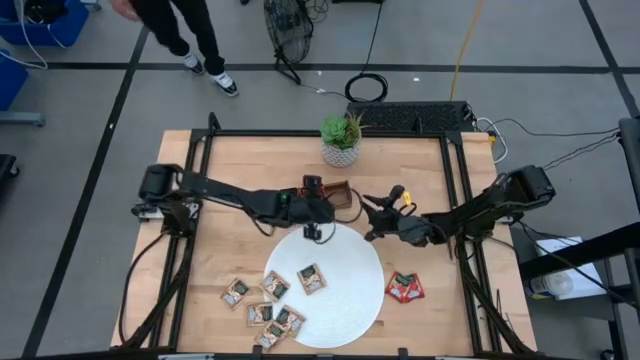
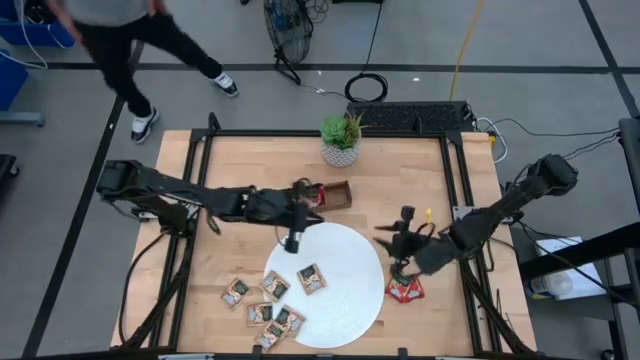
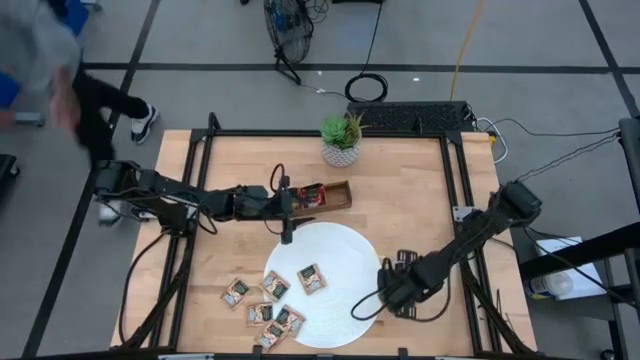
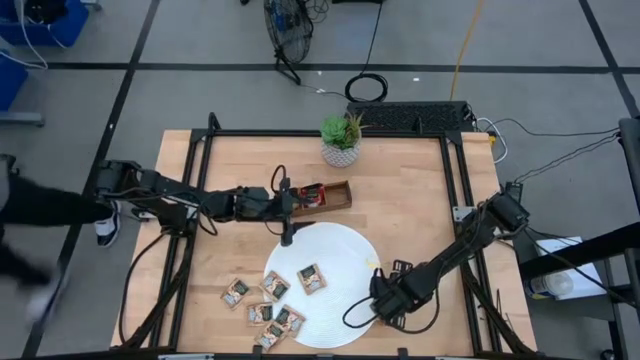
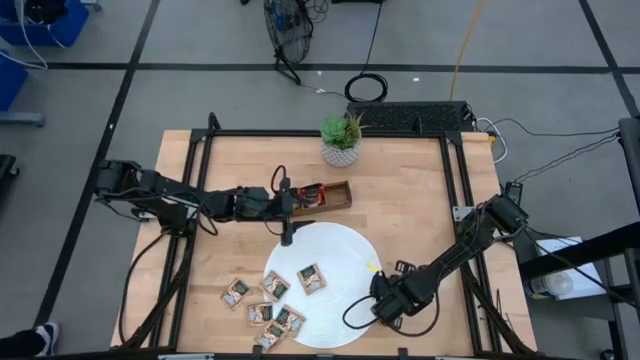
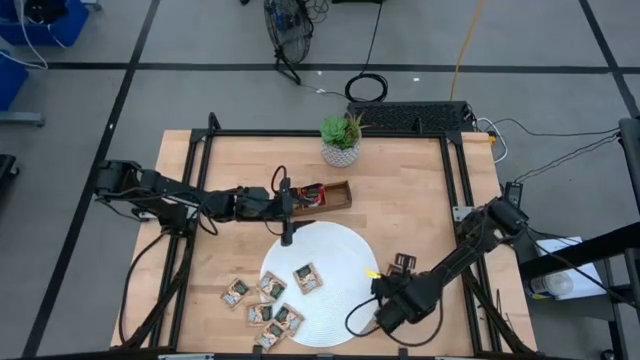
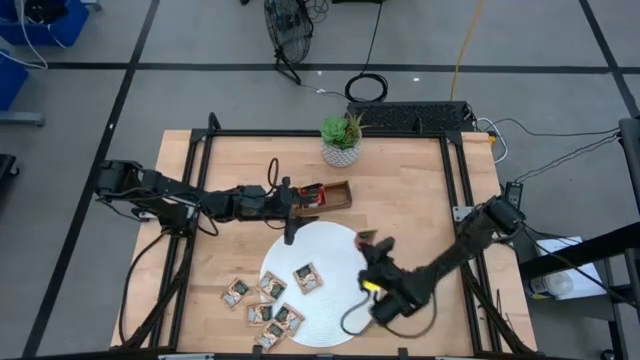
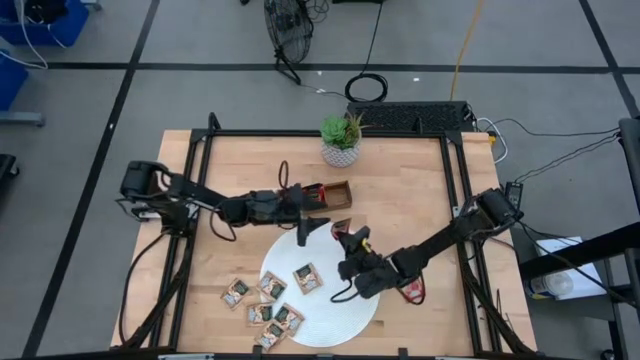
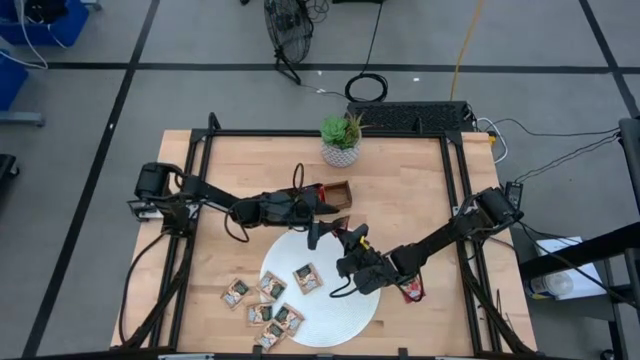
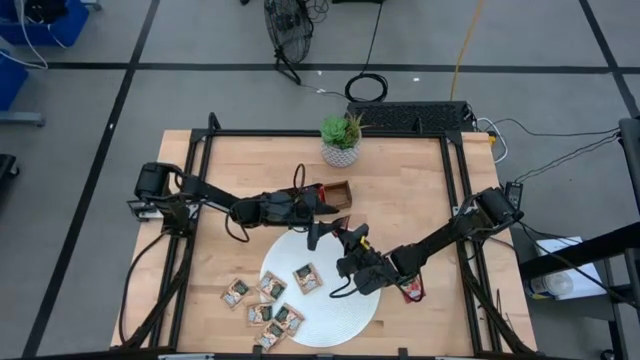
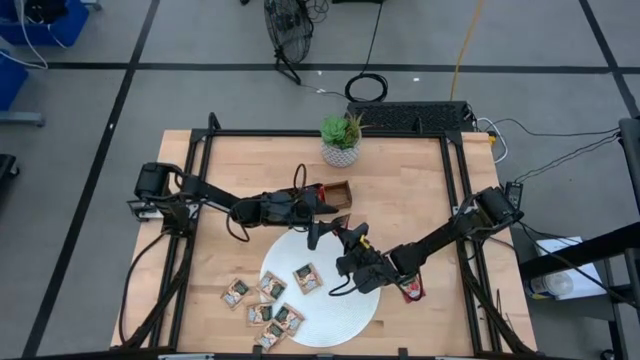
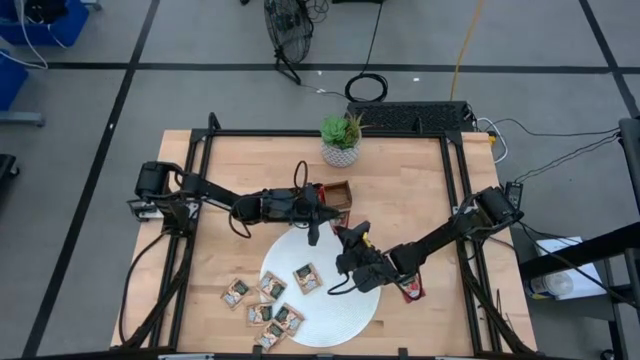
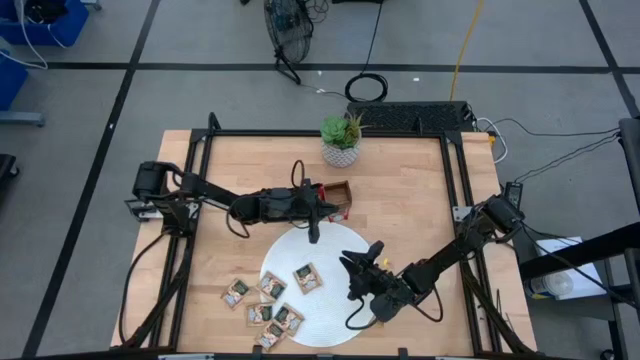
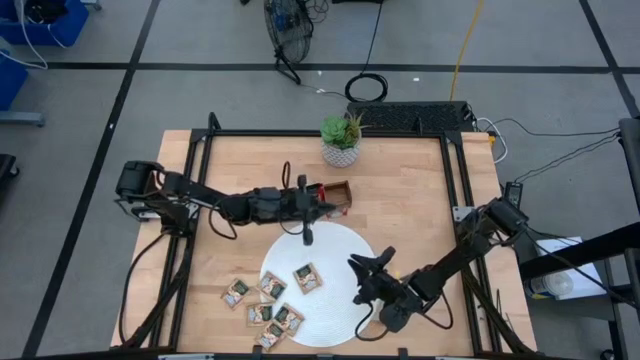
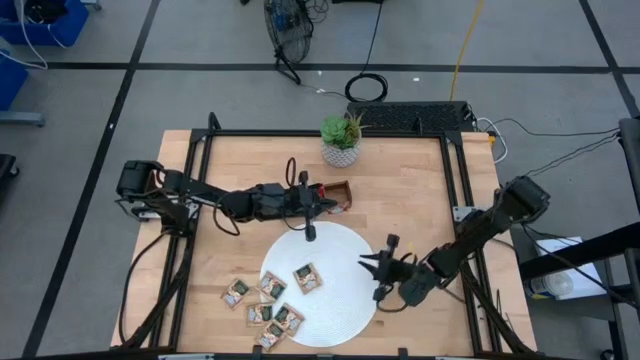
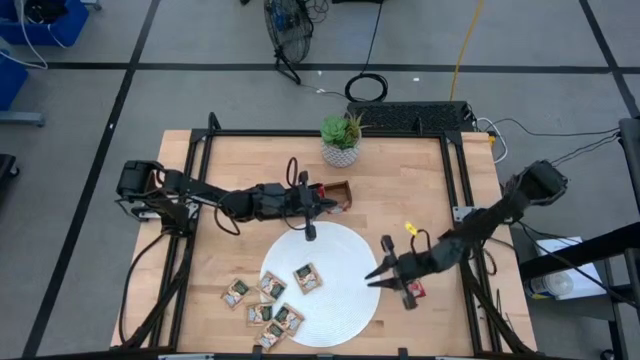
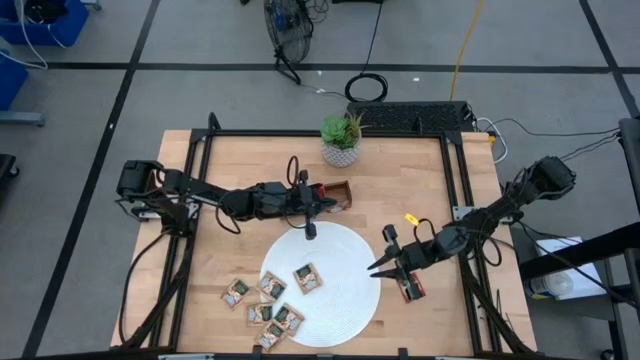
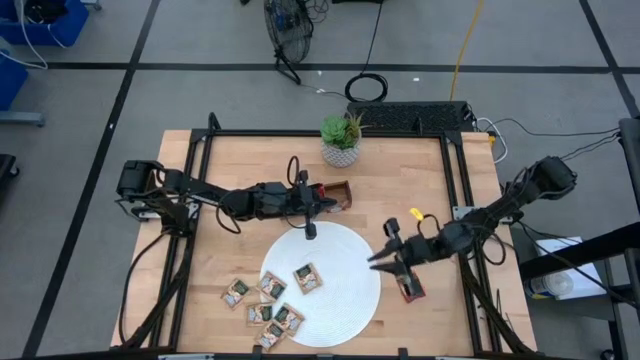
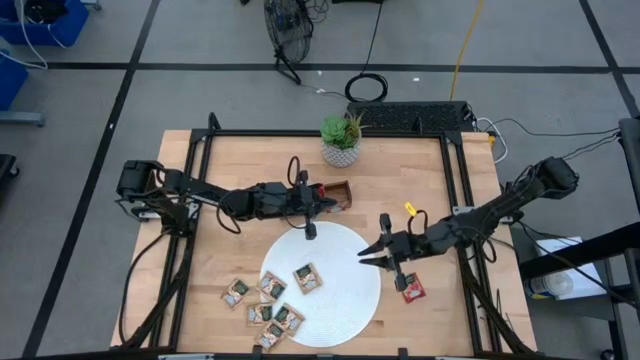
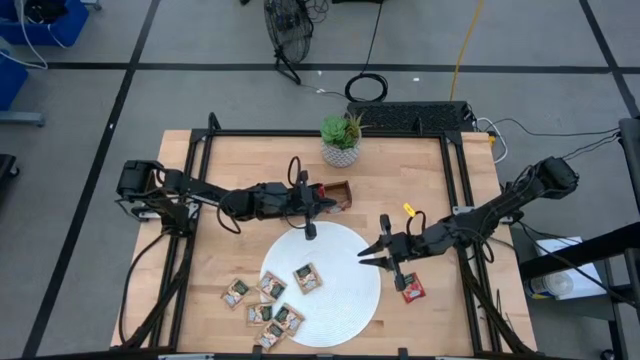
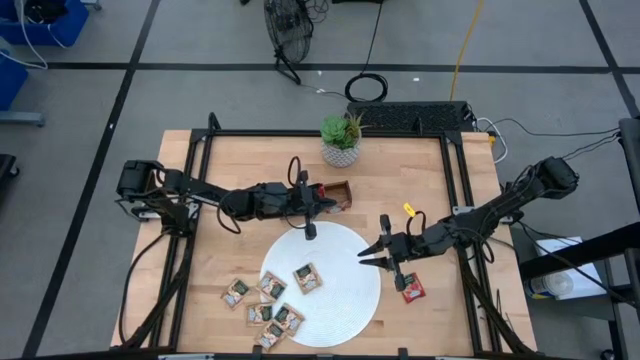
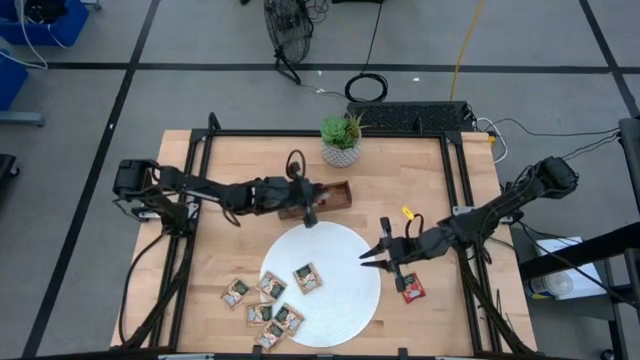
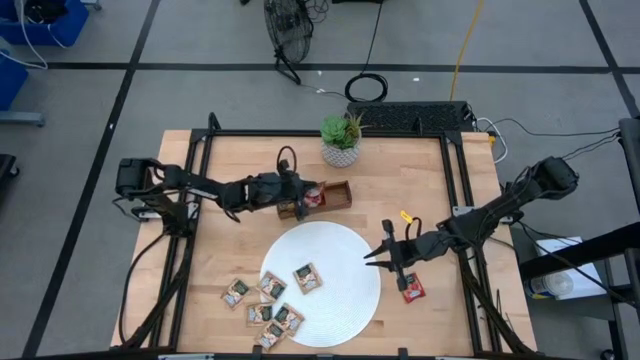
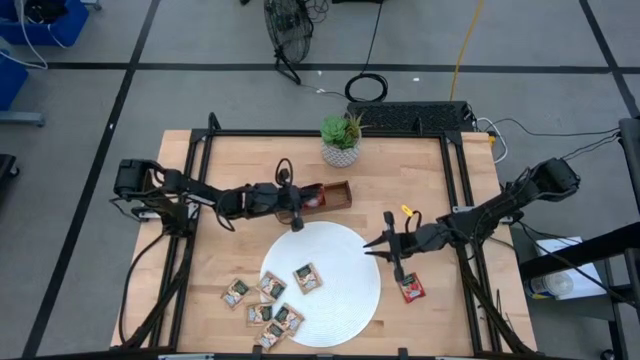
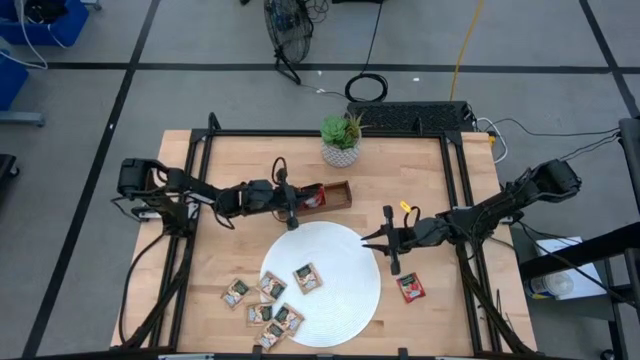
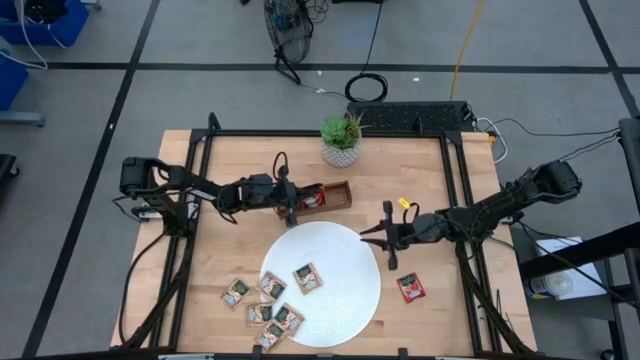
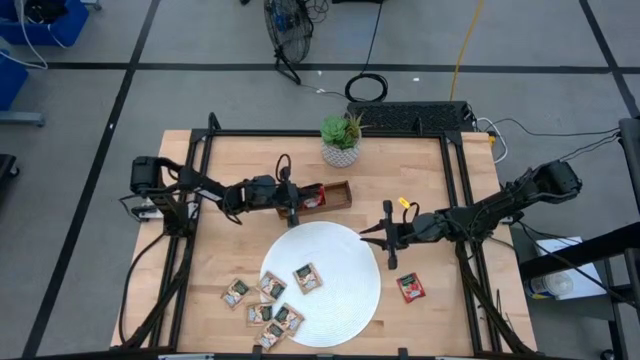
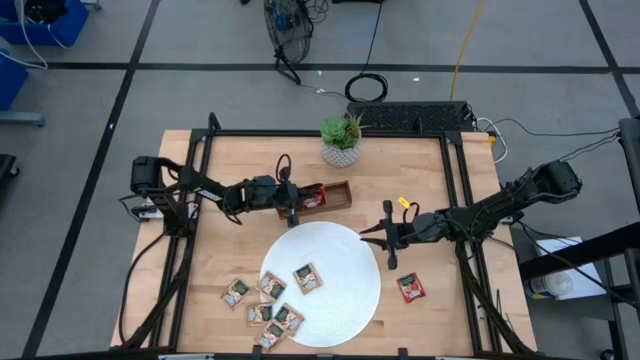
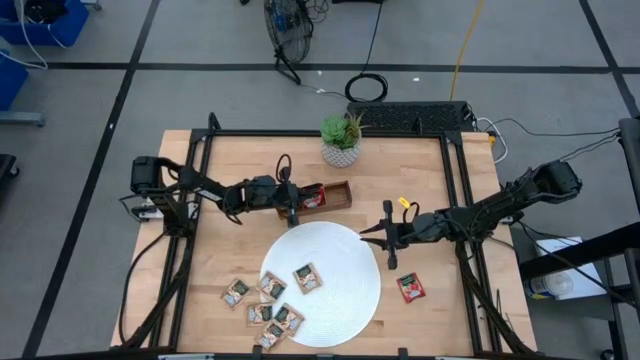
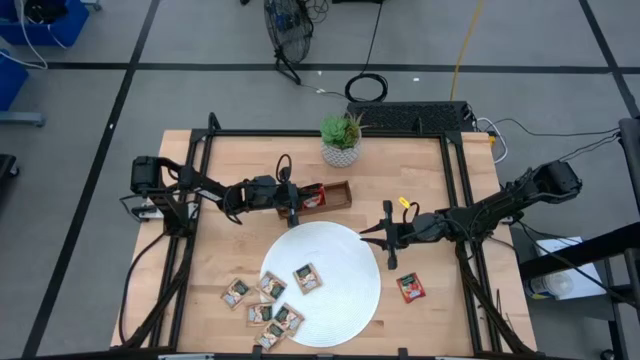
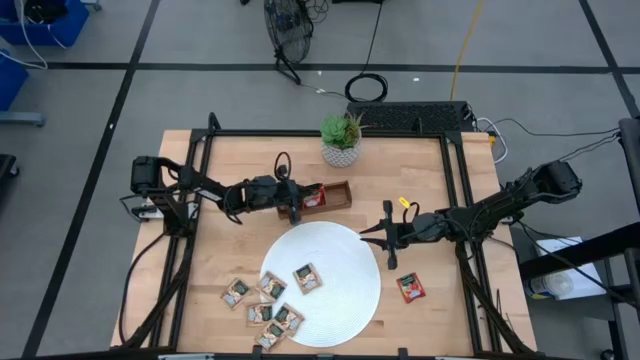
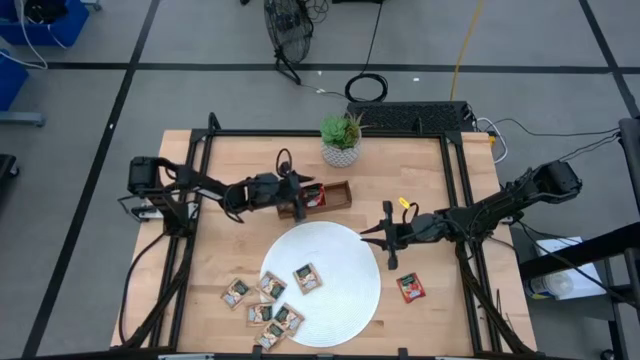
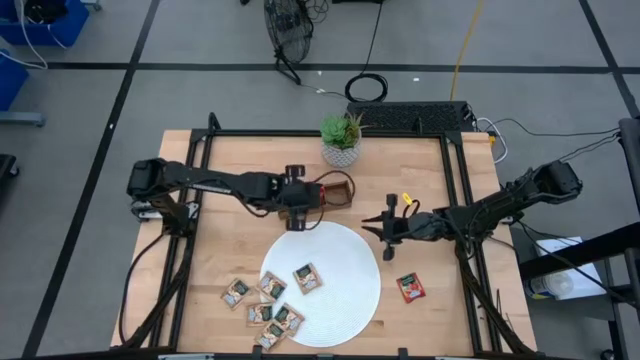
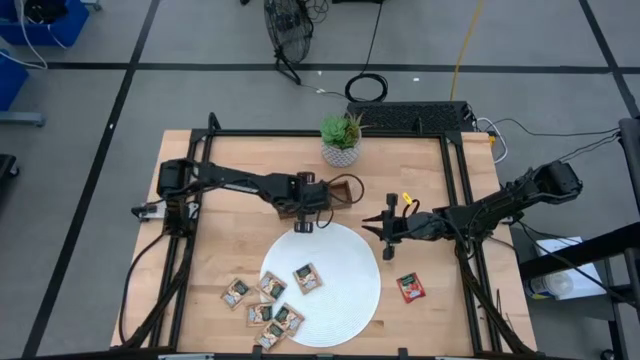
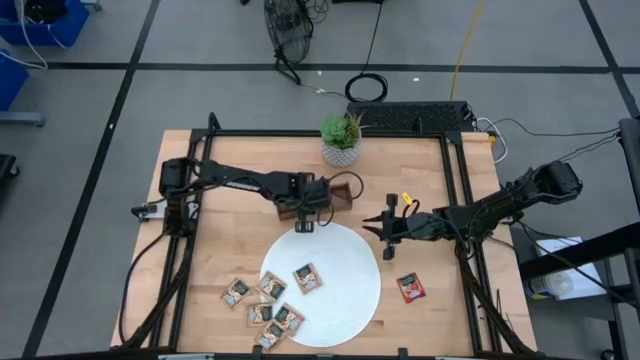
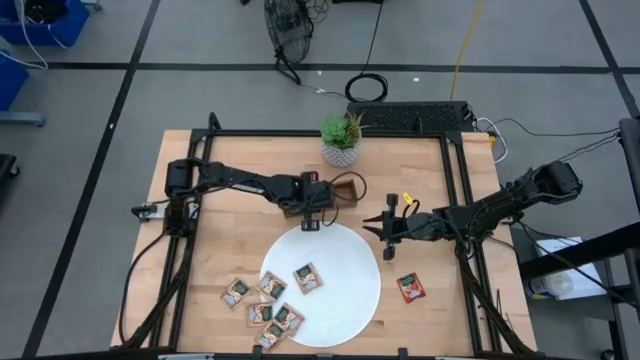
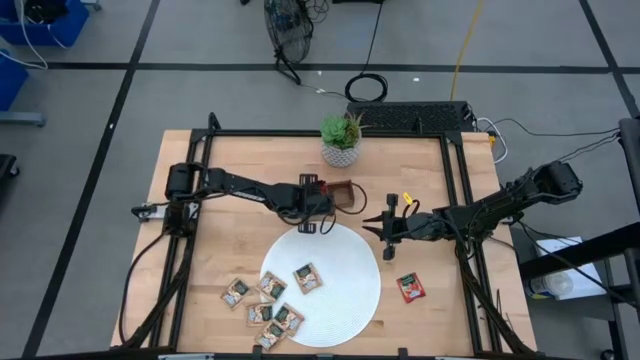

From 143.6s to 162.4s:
Task: Pick & Place Tea
Put the strawberry tea bag into the wooden organizer

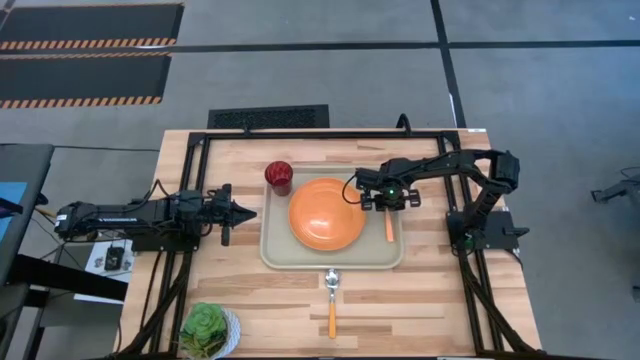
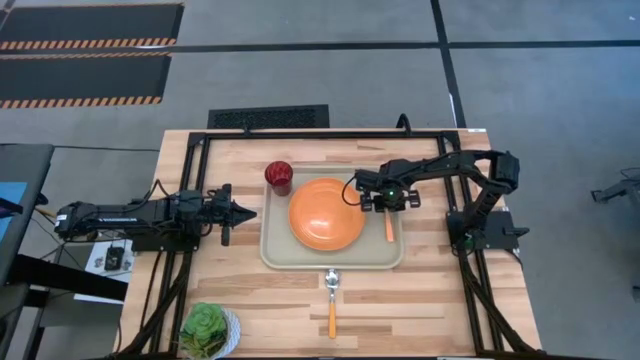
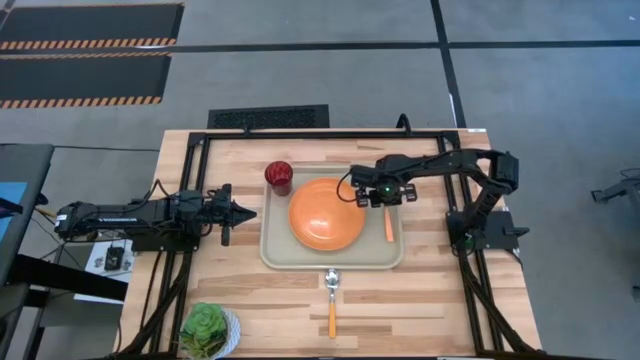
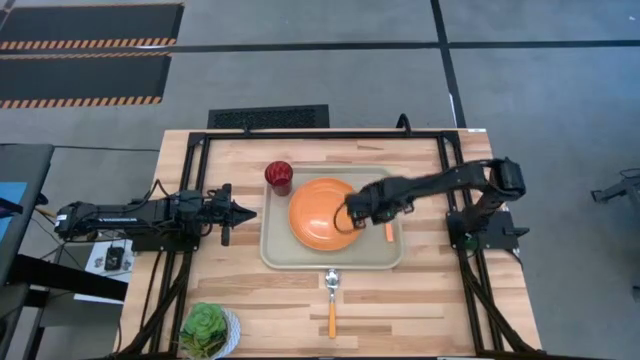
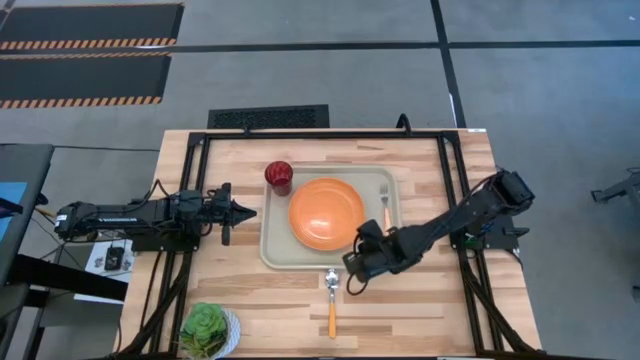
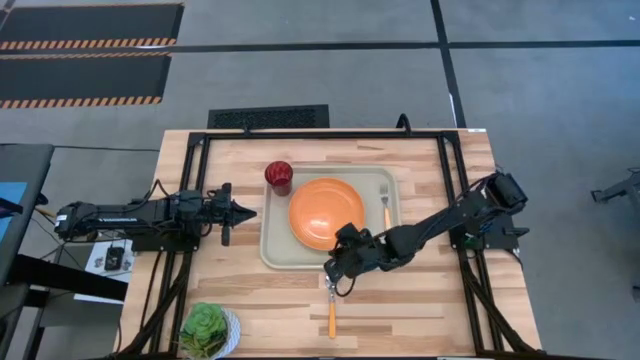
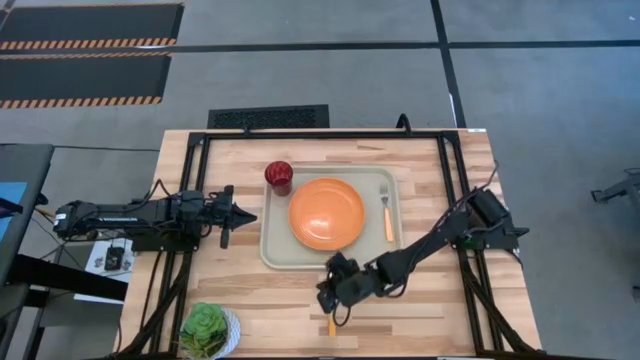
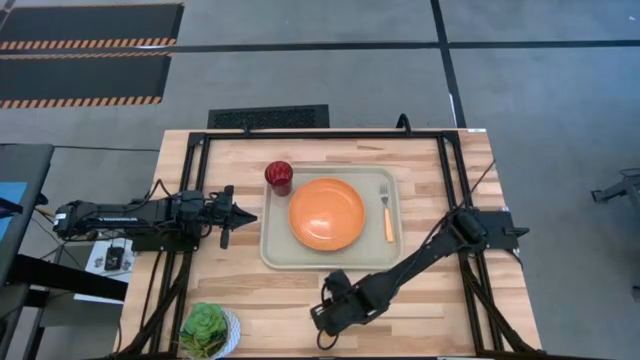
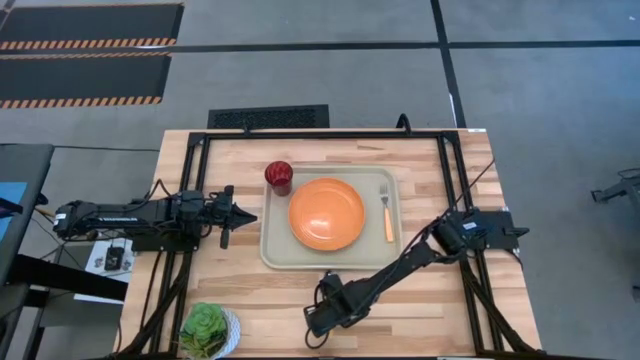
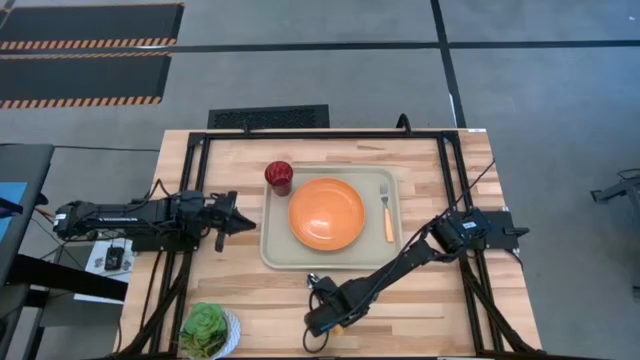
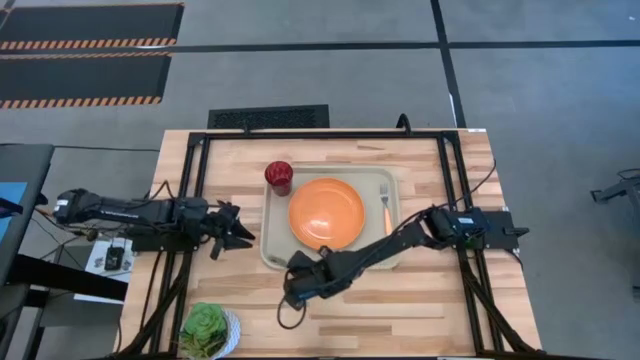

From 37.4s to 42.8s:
Task: Pick and place plate/cup/fork/spoon on tray
Put the orange spoon to the right of the orange plate on the gray serving tray
